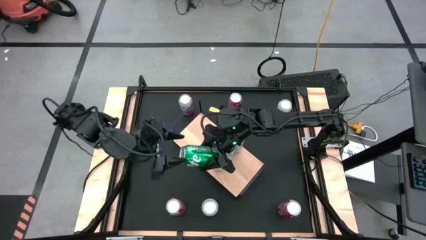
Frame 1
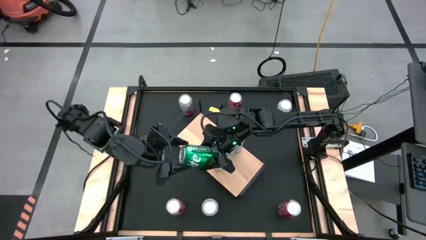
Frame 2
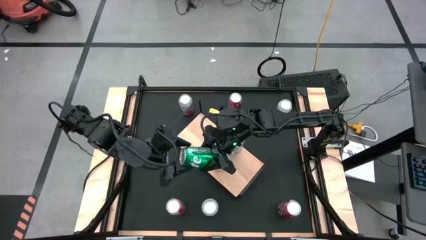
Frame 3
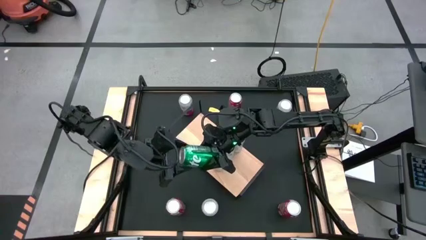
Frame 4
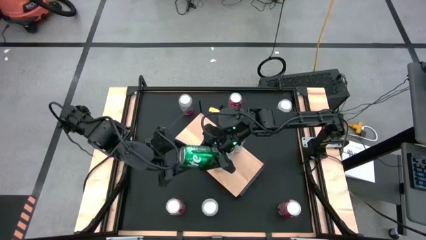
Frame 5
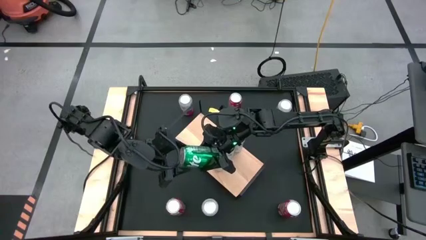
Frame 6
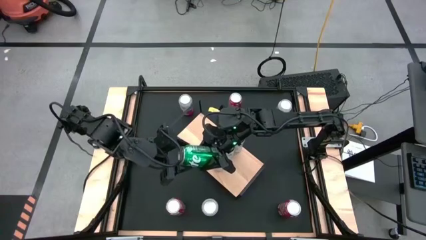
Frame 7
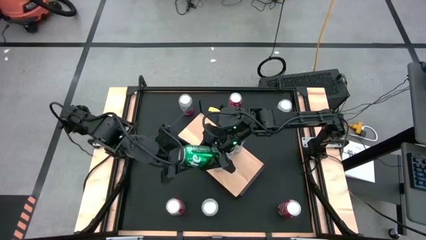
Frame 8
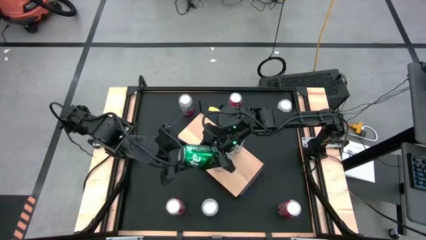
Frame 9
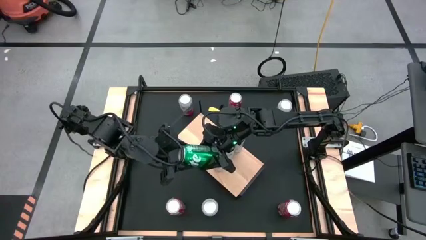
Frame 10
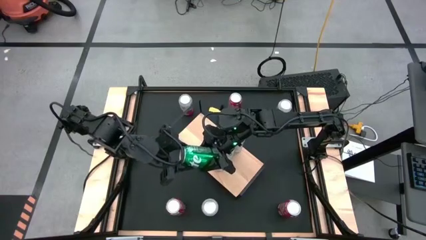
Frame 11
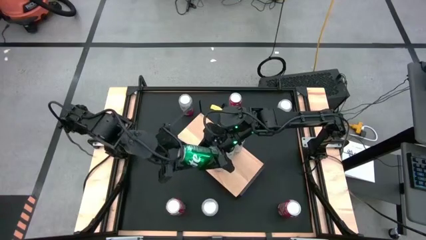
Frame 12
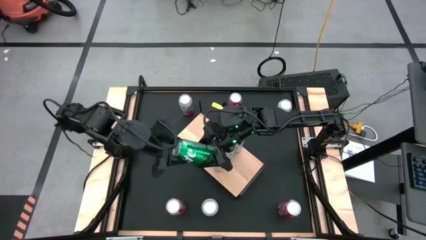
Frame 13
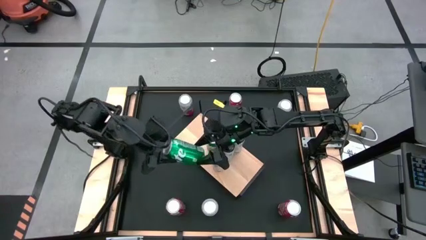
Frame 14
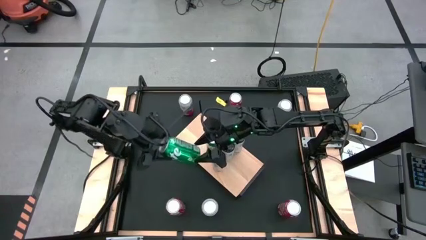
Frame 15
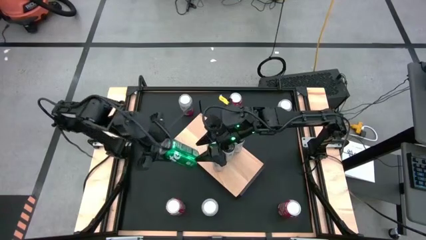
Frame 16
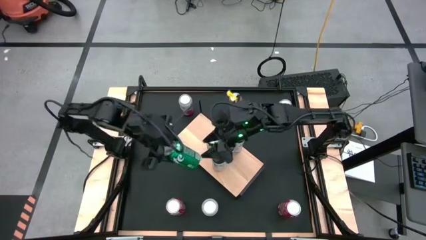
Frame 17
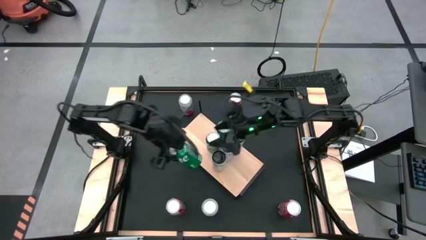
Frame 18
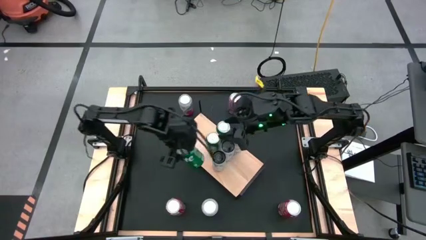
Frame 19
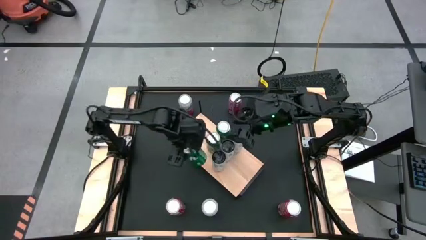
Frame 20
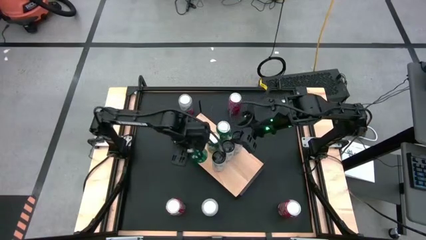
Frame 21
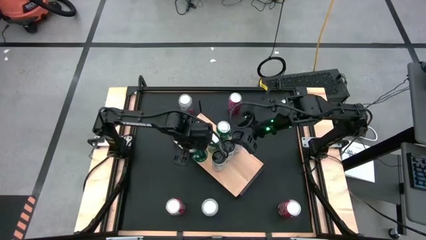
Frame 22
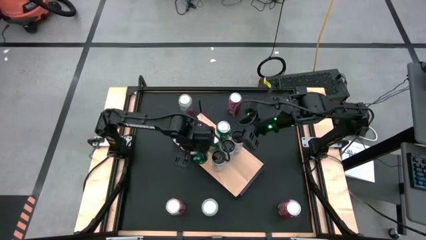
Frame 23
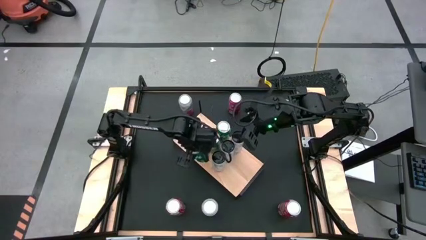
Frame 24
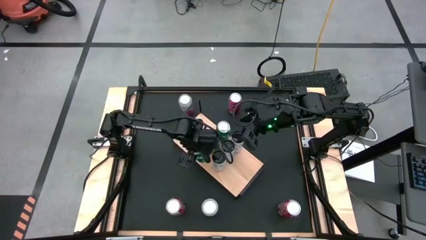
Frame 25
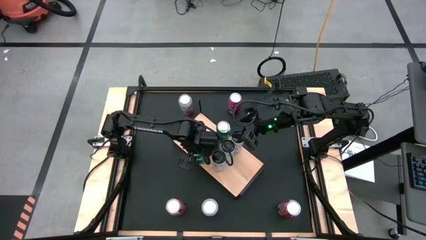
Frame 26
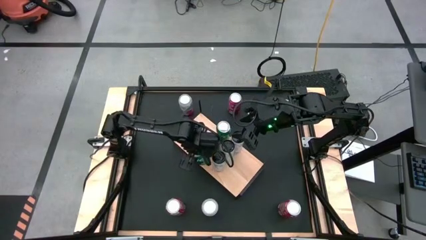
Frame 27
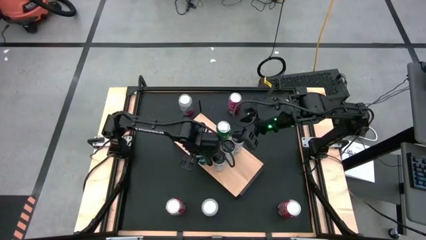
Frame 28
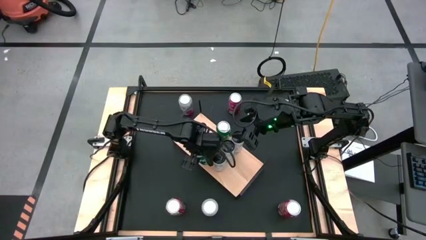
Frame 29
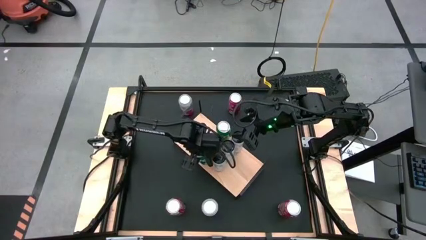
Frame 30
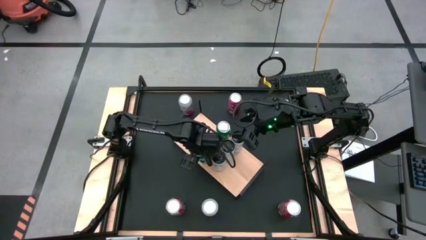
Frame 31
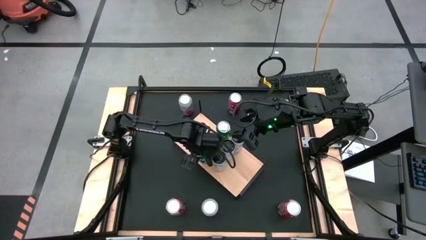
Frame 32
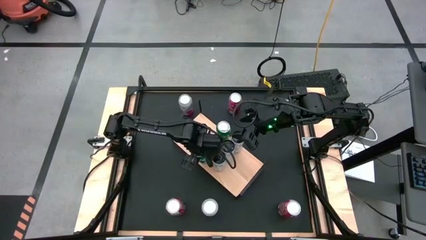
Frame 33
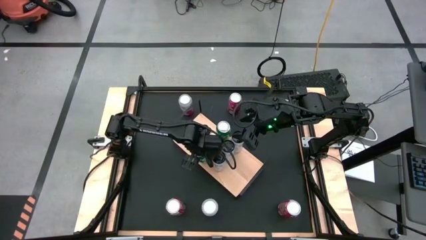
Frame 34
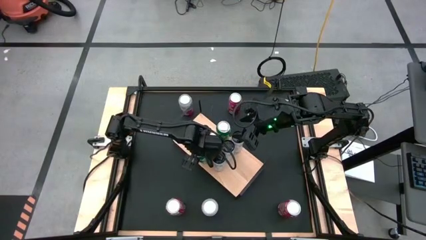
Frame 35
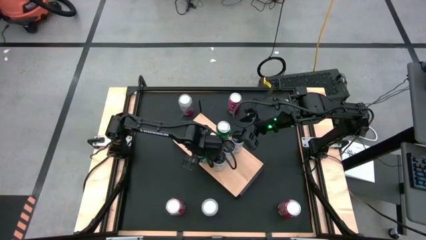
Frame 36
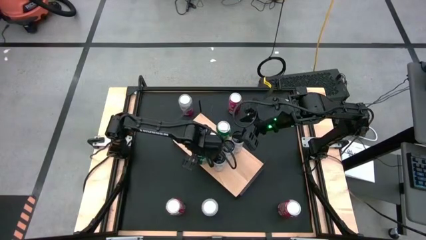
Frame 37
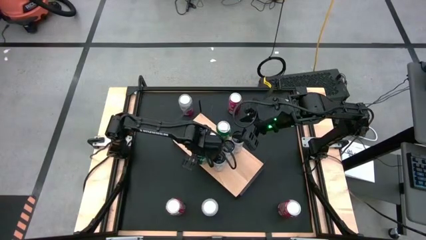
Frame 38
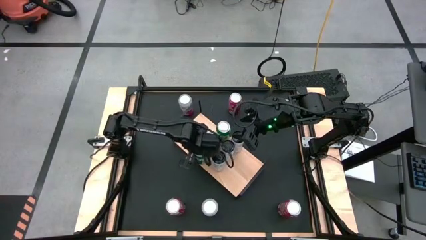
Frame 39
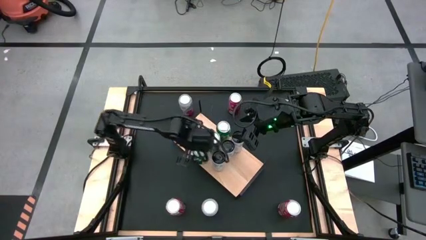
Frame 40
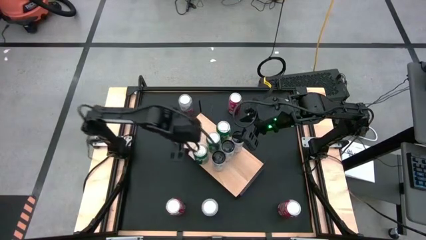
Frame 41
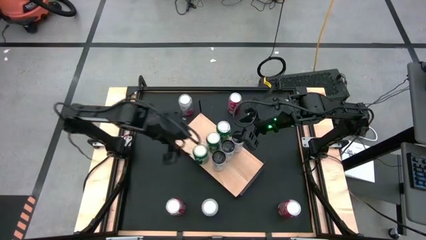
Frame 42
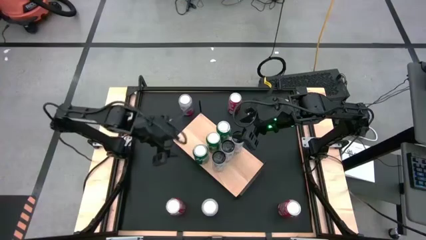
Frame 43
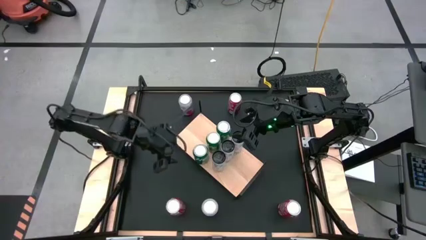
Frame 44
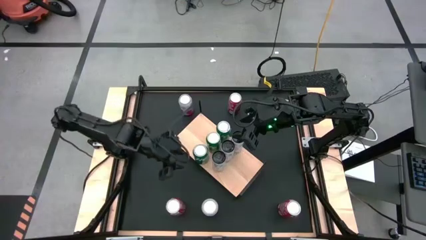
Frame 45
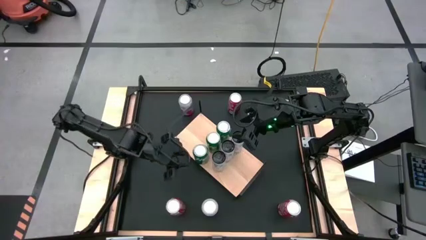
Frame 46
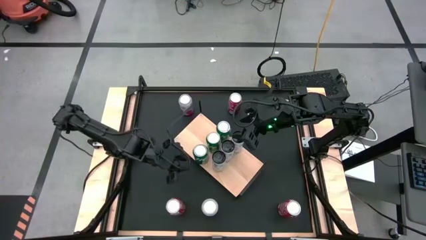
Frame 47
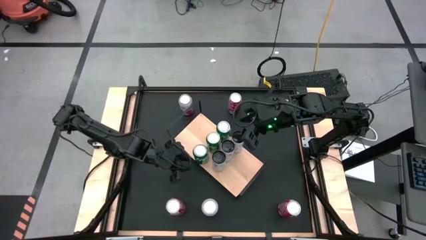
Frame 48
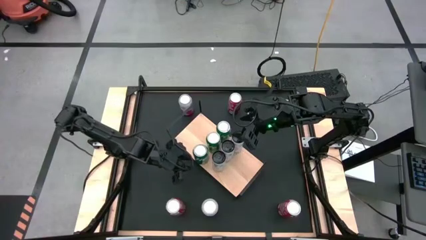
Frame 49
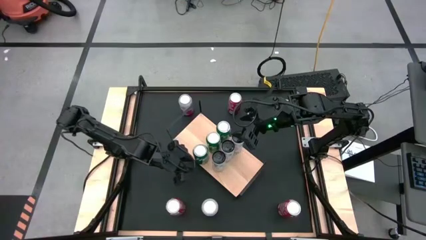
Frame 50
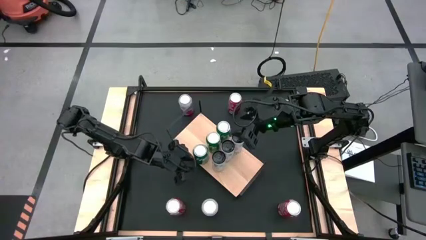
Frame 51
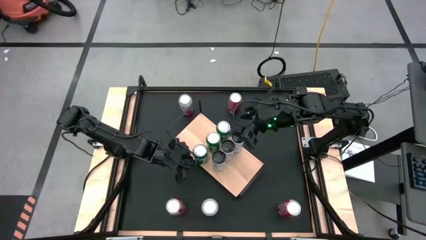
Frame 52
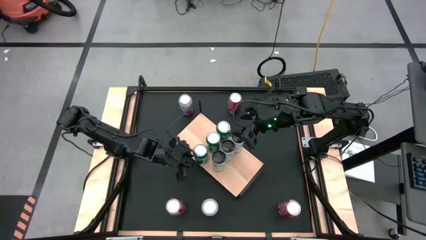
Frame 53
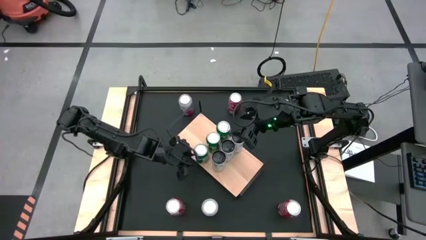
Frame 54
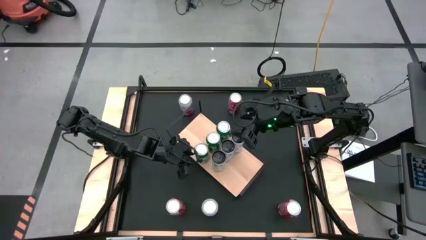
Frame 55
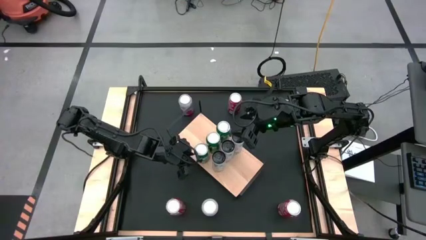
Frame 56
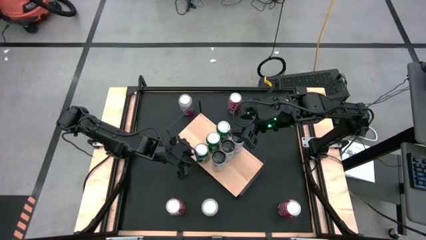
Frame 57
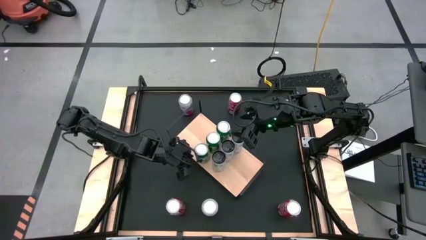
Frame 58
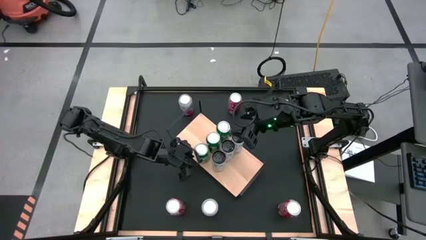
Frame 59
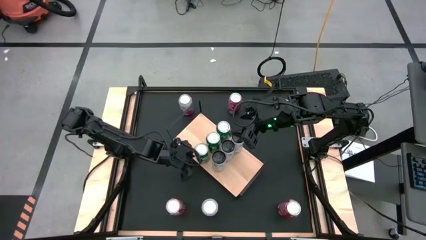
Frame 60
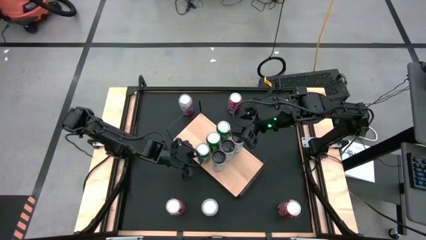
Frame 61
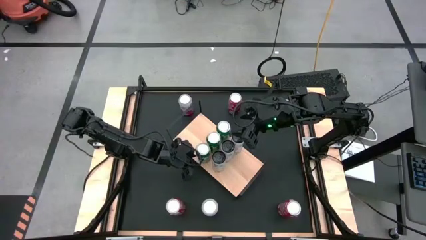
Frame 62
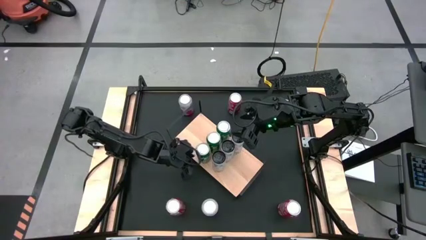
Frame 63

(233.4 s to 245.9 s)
Task: Place canned beverage on shelf
Put the green soda can aligned with the other green soda cans

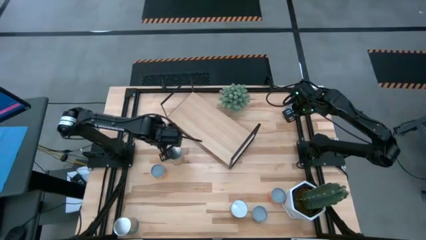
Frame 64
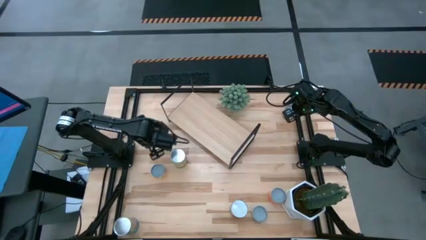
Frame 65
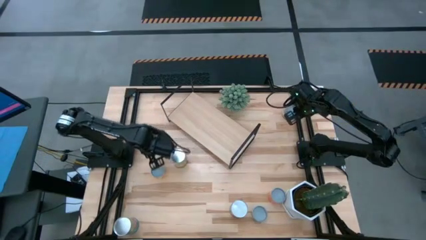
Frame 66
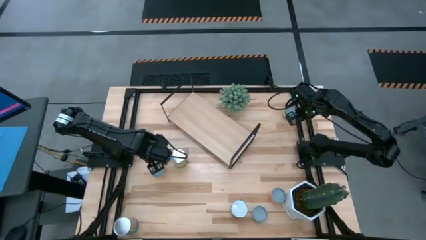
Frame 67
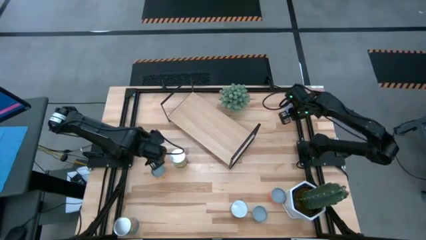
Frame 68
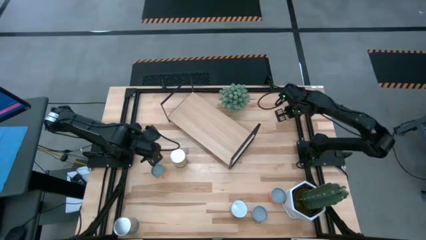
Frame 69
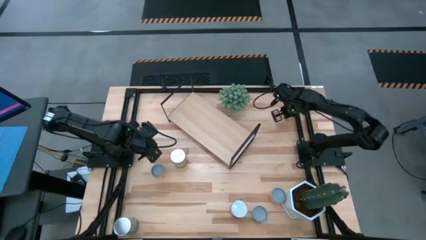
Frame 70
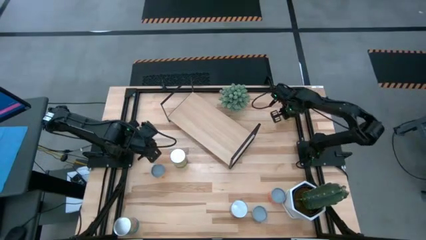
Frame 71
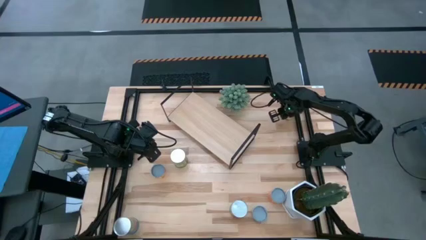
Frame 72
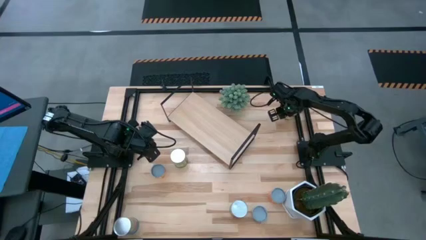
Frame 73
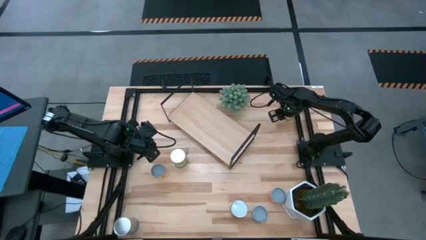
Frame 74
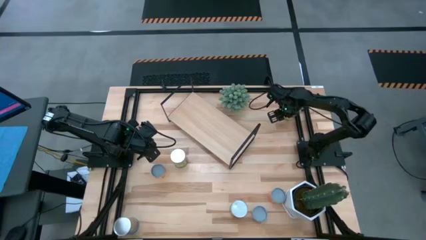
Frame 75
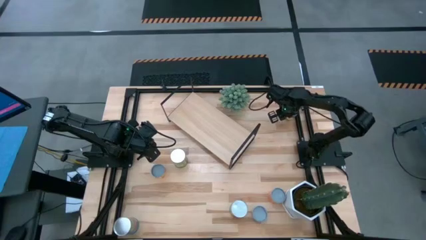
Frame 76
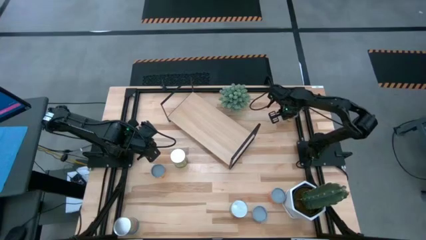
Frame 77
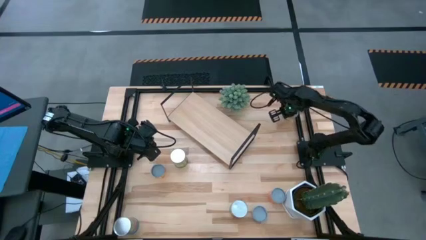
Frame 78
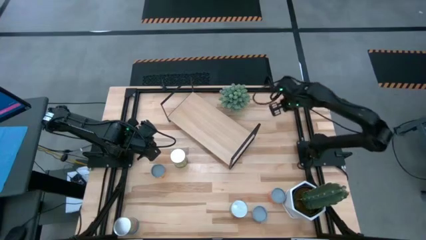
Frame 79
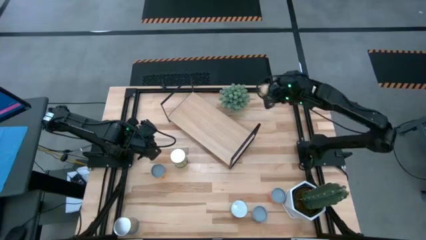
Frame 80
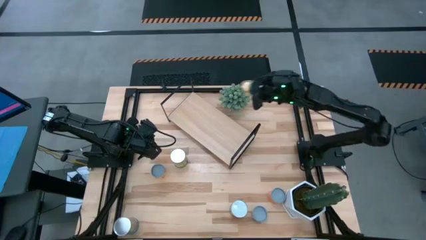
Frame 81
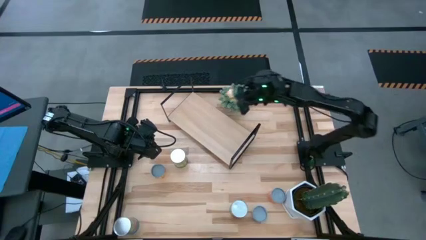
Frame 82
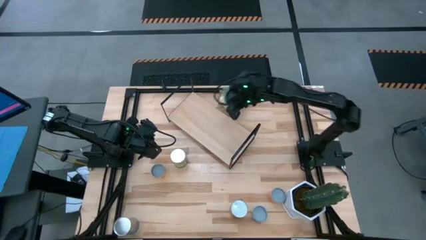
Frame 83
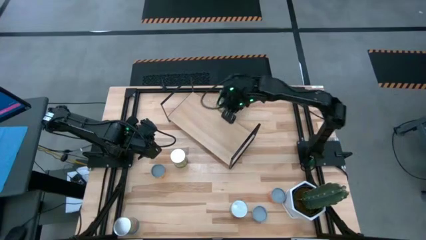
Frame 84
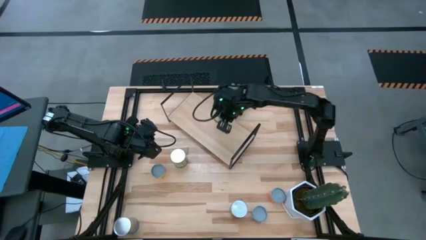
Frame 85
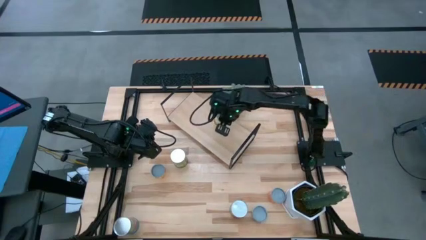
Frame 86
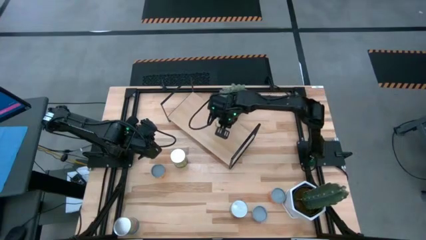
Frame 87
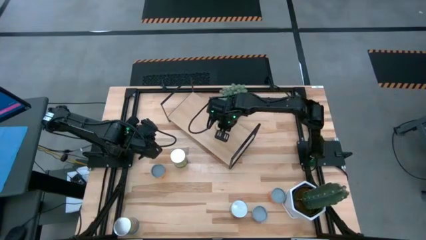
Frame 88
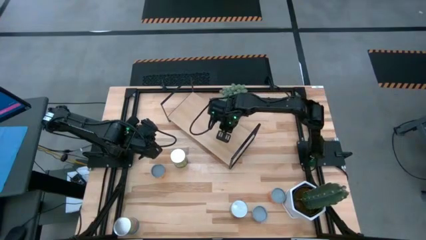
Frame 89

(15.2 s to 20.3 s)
Task: Pick and place cans onto a shelf
Put the canned sliced peaches on the shelf
